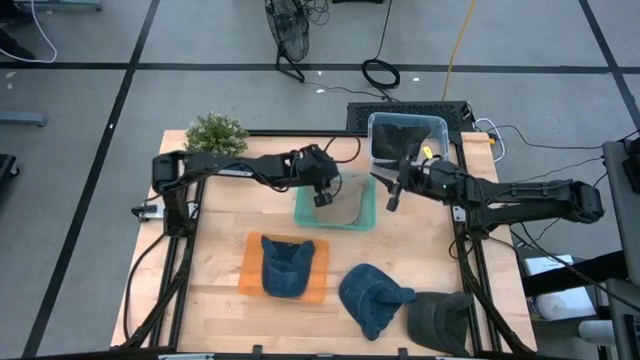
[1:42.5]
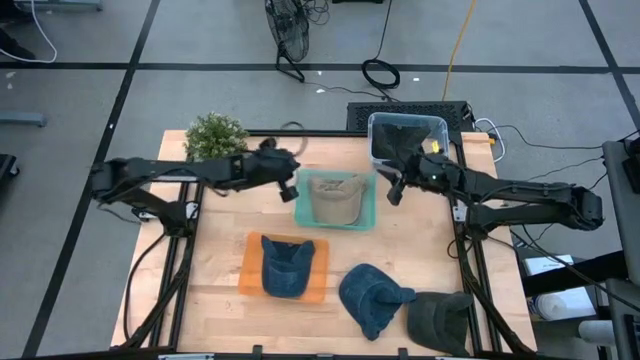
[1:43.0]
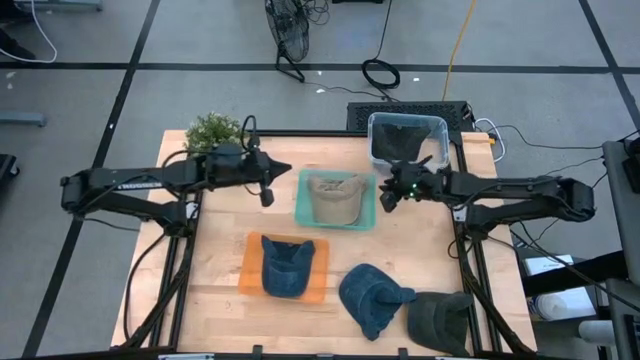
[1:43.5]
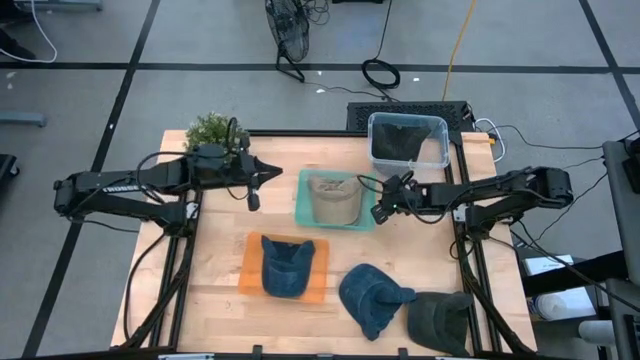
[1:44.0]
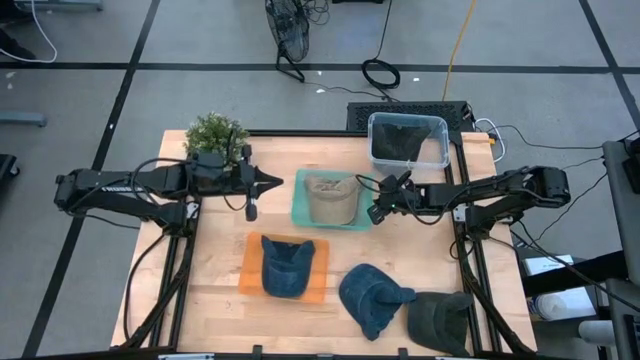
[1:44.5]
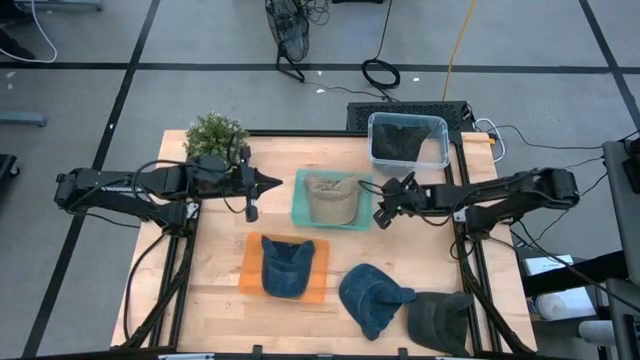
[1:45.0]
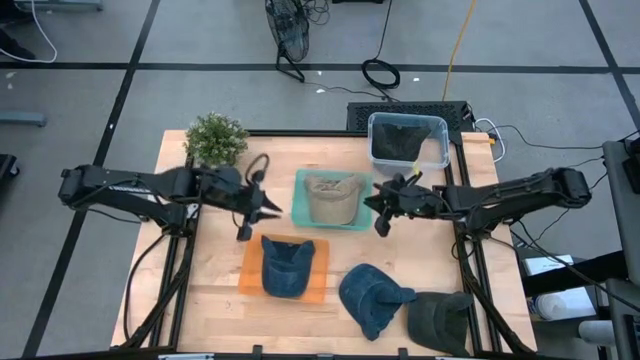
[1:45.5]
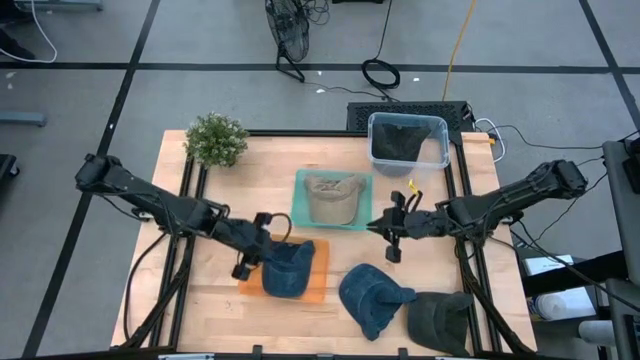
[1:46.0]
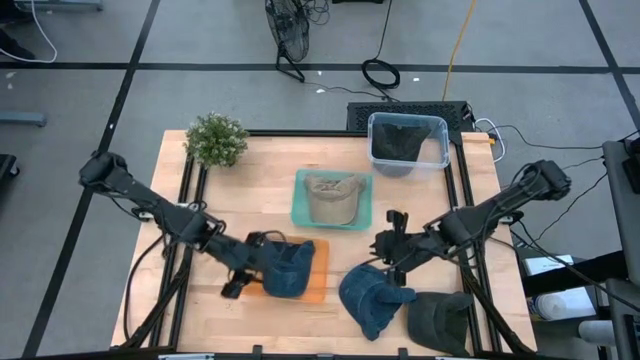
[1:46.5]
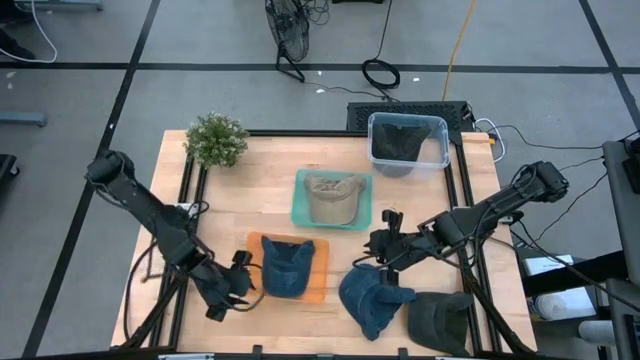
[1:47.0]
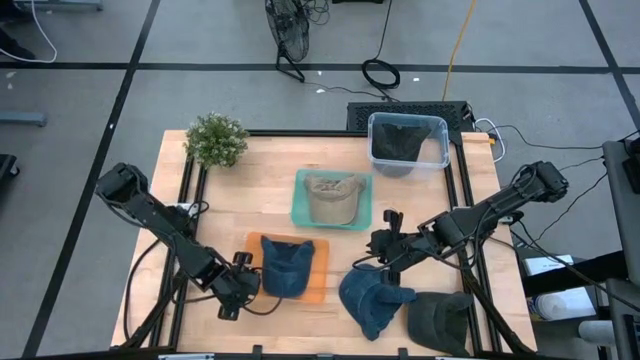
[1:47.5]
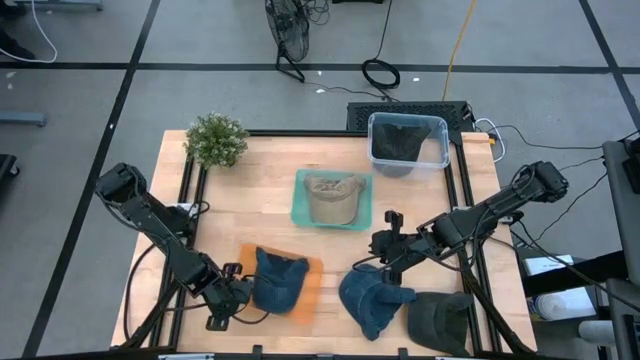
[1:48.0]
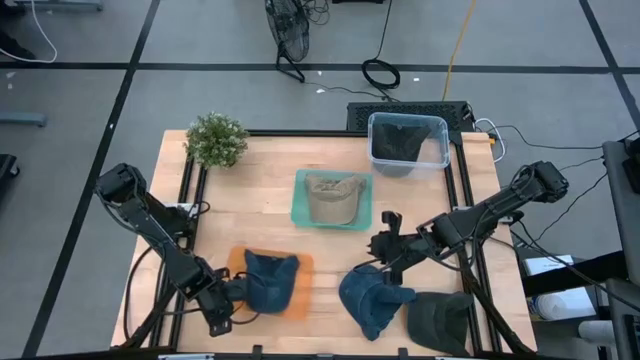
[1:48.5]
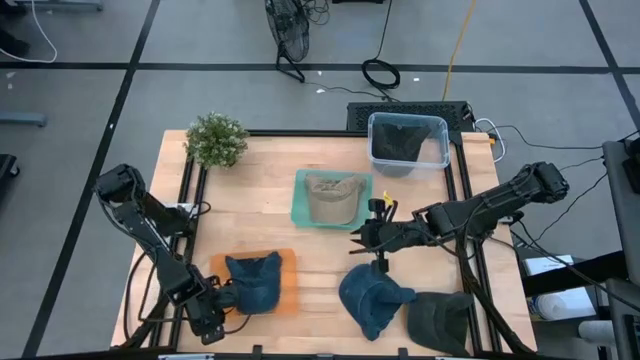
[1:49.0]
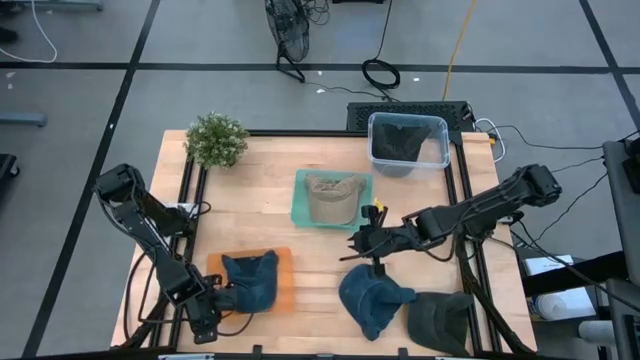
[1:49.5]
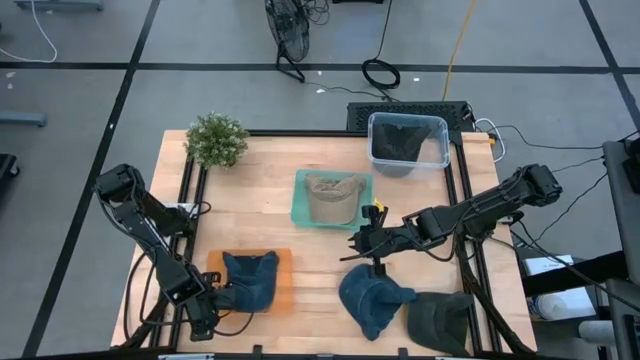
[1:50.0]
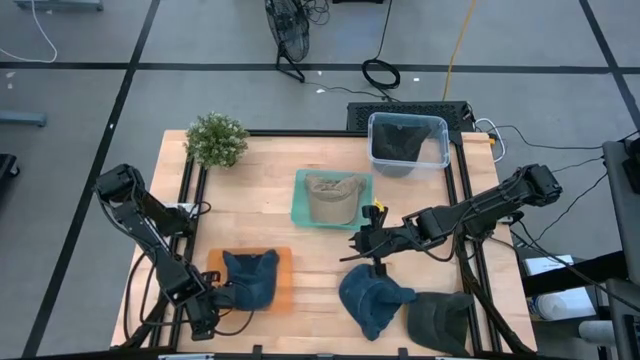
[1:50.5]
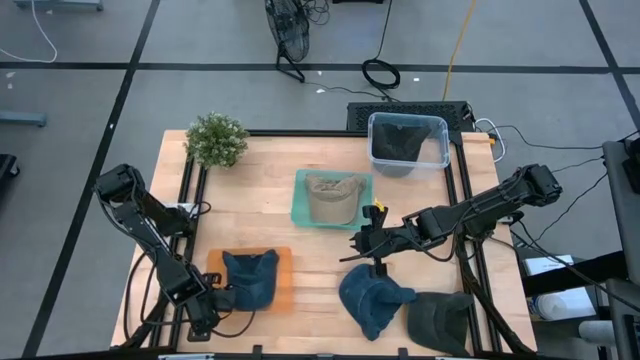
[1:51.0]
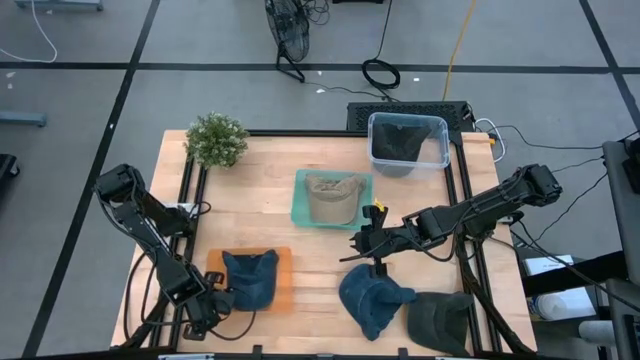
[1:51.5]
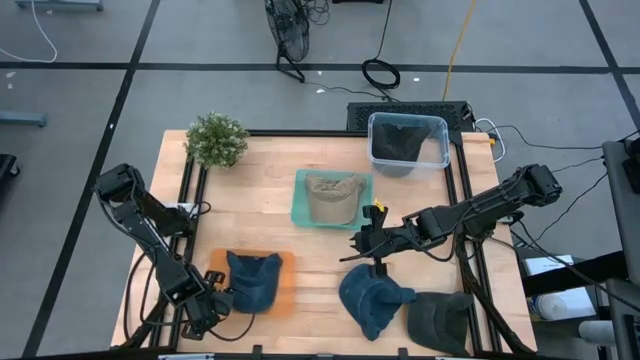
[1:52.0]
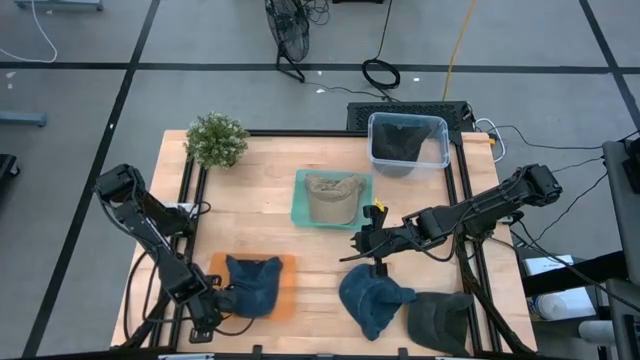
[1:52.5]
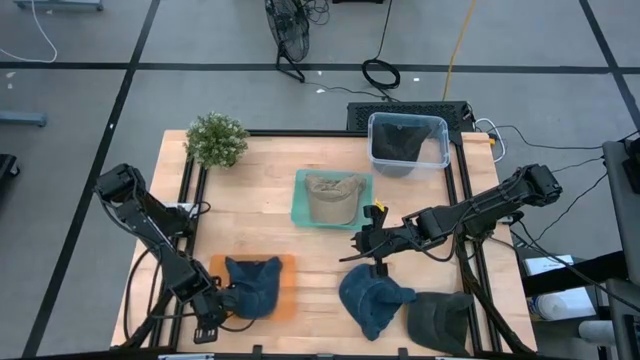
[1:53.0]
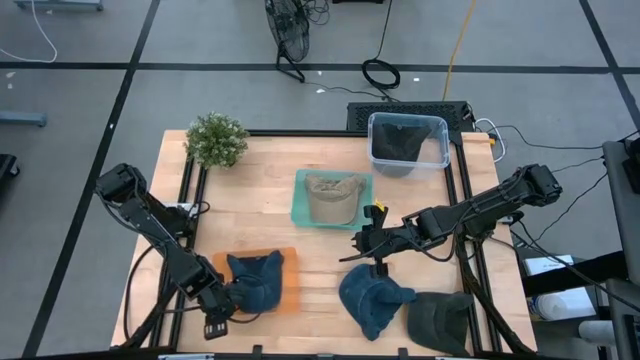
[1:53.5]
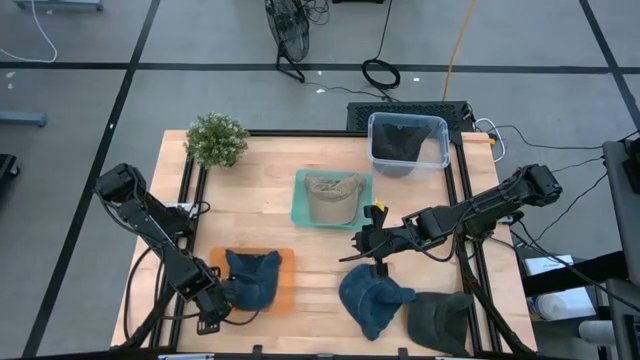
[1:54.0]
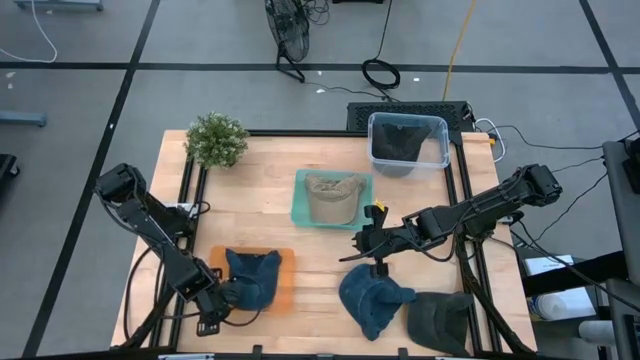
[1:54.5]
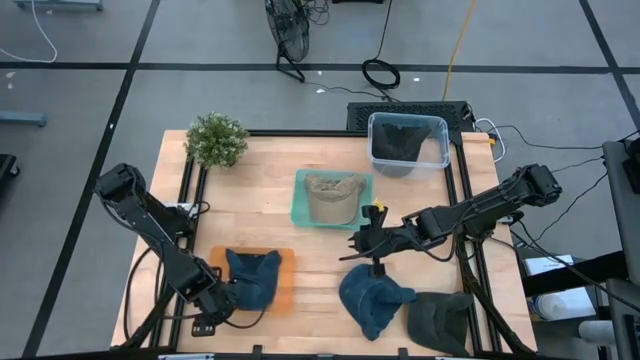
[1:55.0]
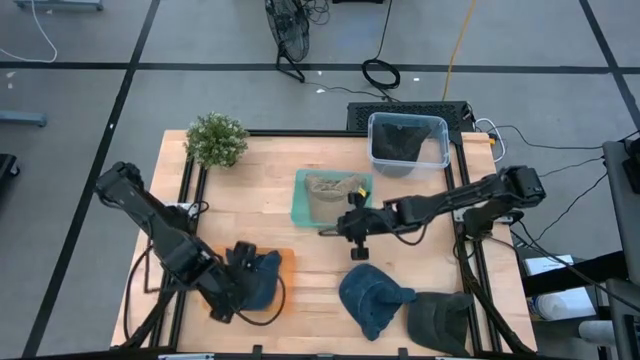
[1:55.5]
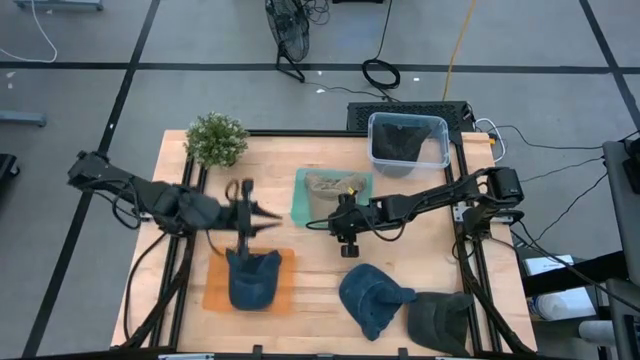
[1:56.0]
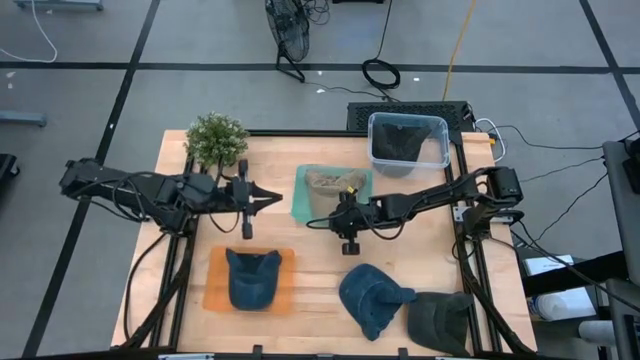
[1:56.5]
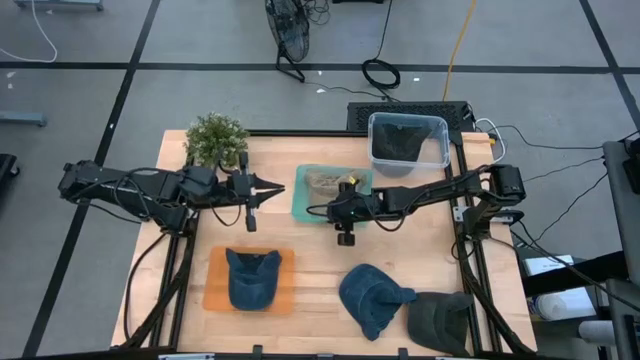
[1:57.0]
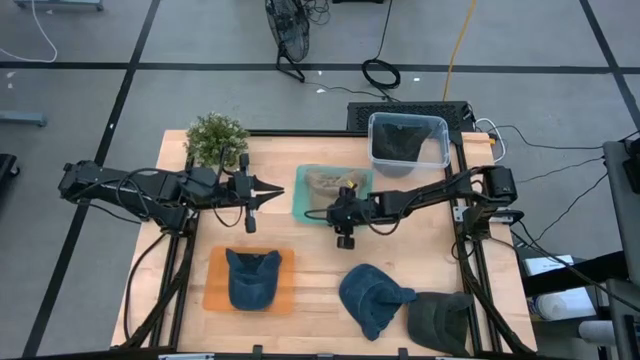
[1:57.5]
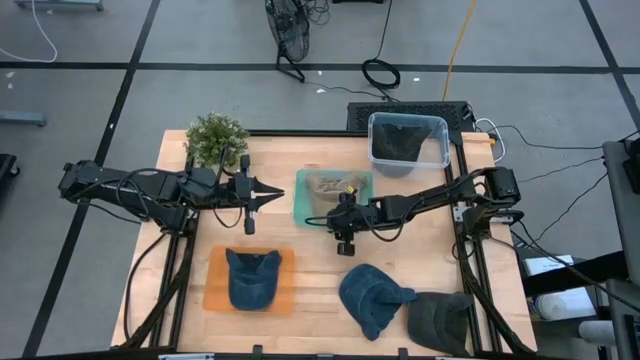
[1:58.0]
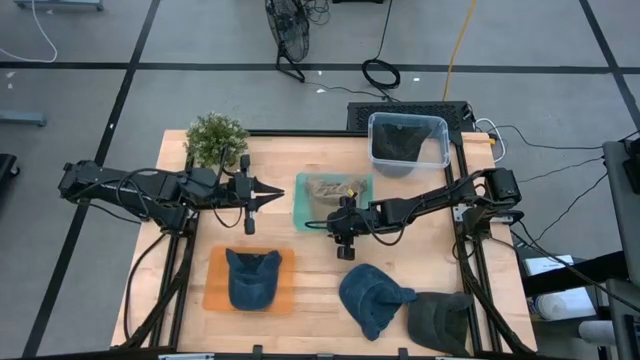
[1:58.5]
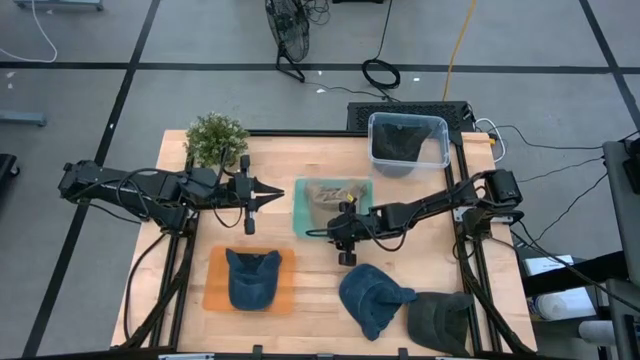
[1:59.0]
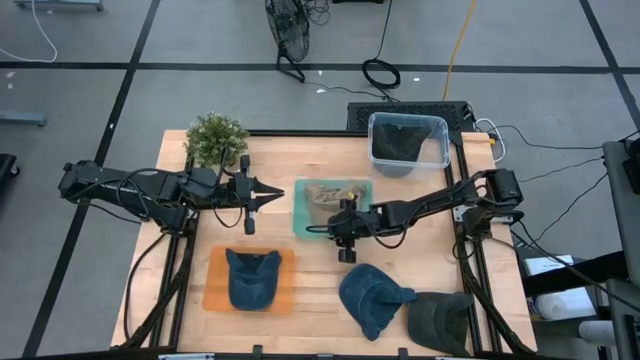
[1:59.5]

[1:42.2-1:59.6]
Task: Pick & Place hat
Adjust the bins on the table

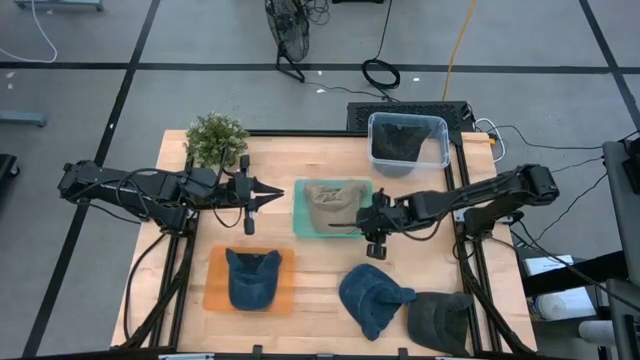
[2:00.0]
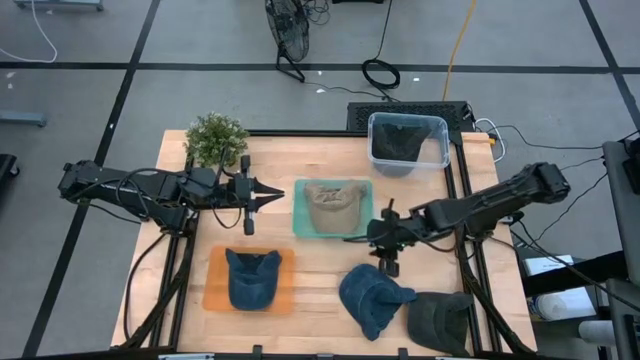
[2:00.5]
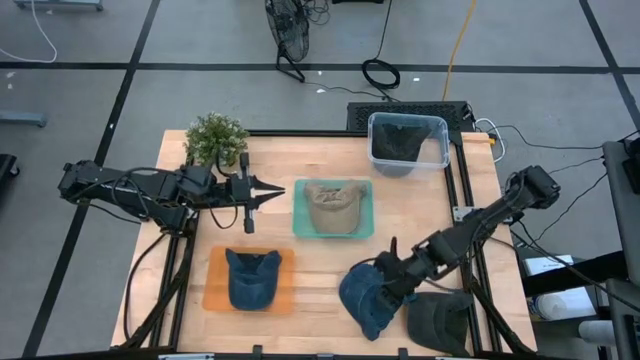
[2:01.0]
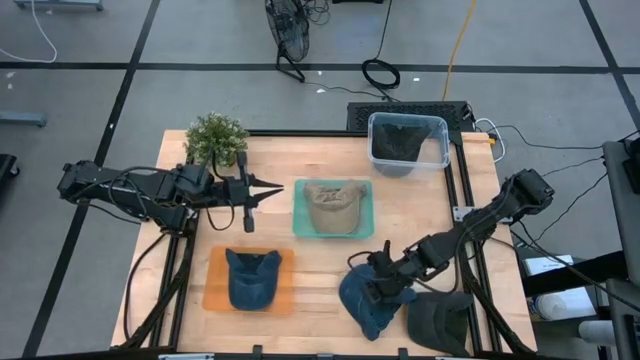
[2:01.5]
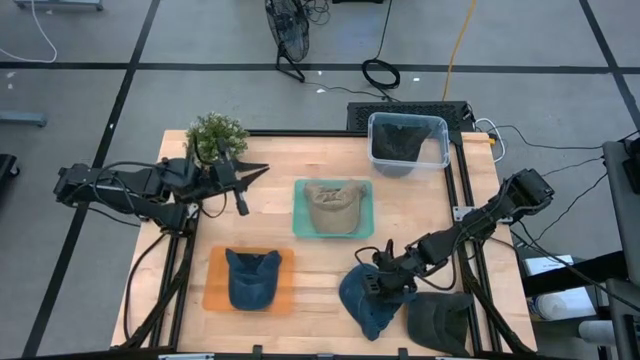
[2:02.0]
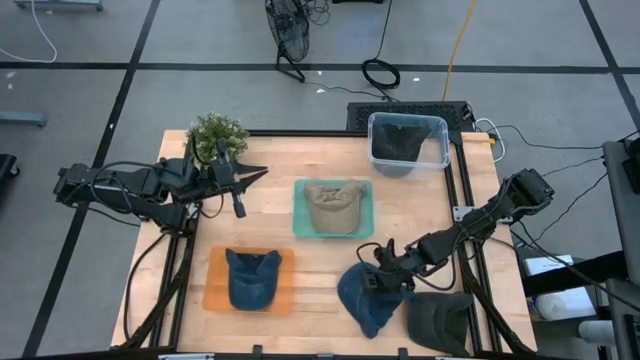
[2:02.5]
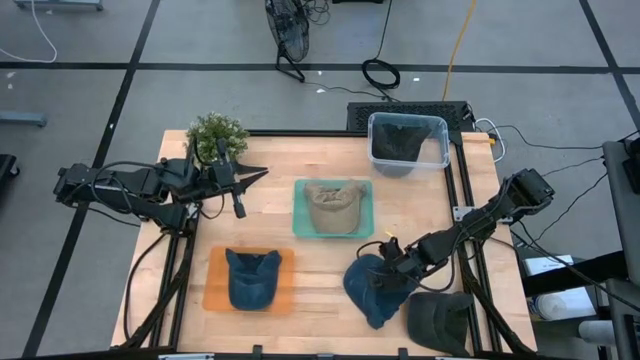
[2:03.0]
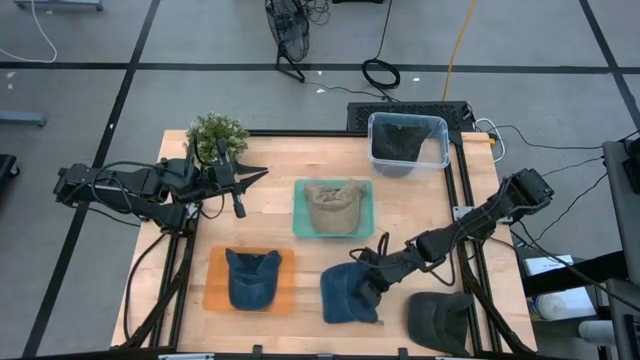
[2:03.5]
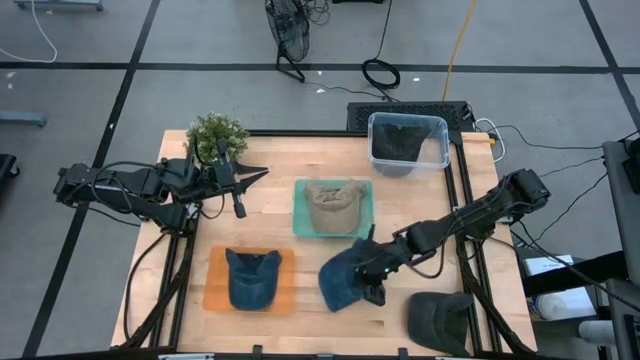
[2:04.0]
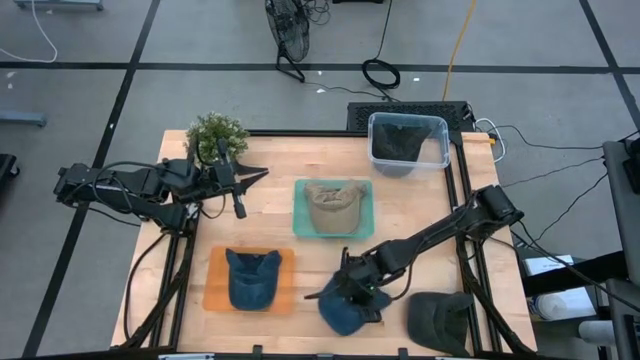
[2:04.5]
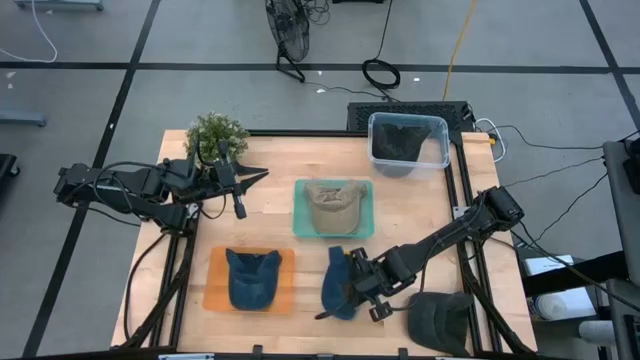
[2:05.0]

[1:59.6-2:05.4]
Put the blue cap into the orange bin
